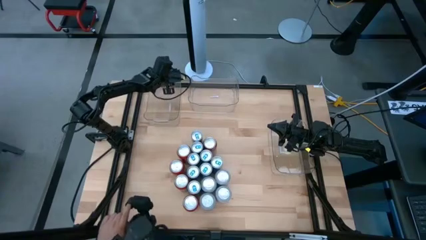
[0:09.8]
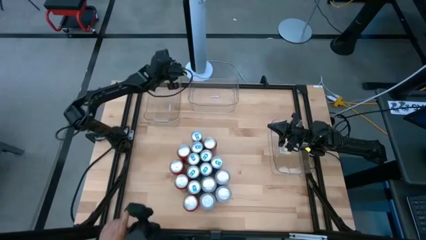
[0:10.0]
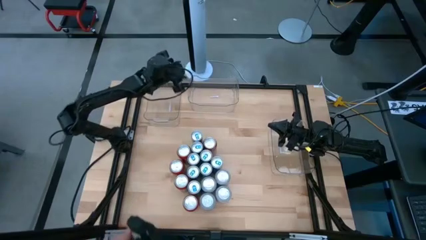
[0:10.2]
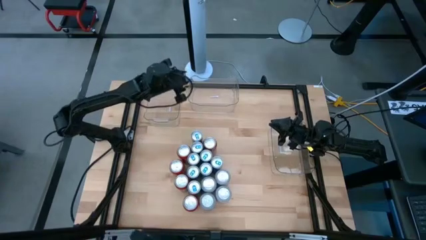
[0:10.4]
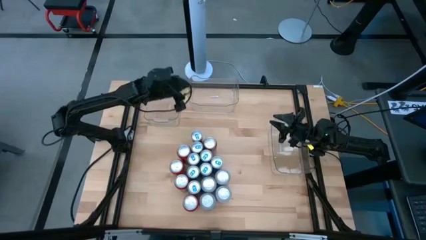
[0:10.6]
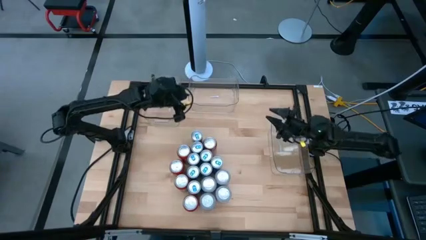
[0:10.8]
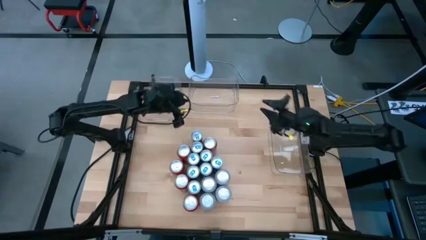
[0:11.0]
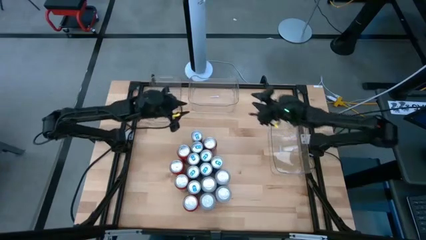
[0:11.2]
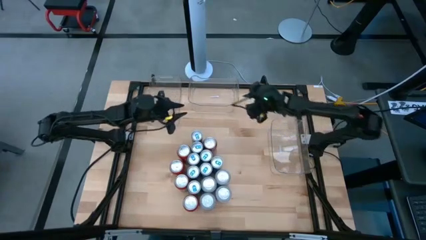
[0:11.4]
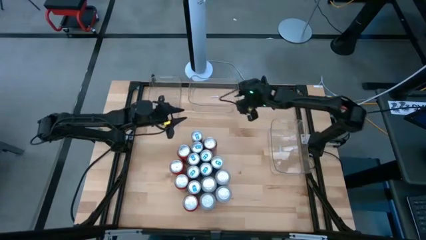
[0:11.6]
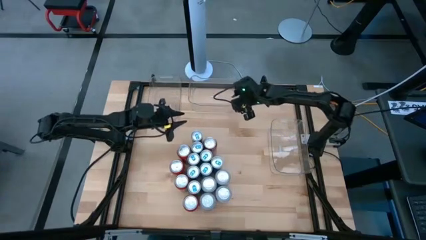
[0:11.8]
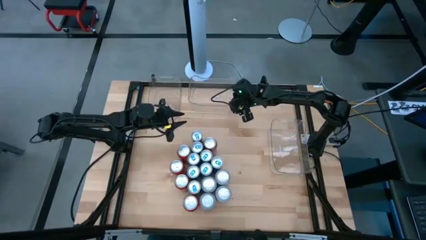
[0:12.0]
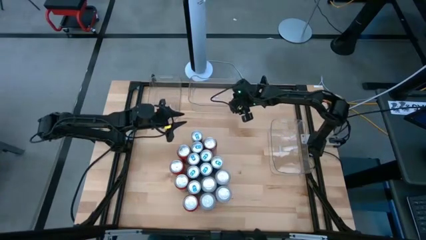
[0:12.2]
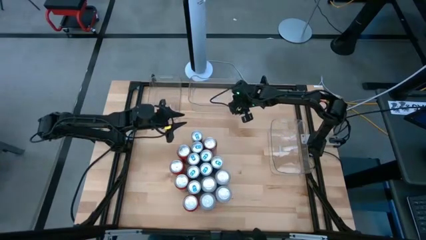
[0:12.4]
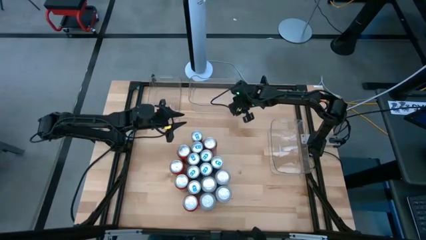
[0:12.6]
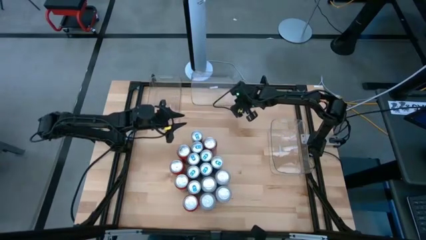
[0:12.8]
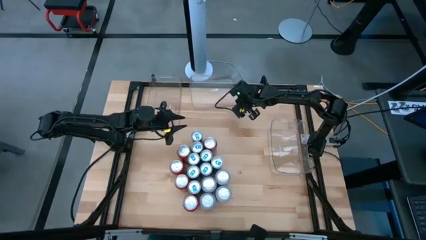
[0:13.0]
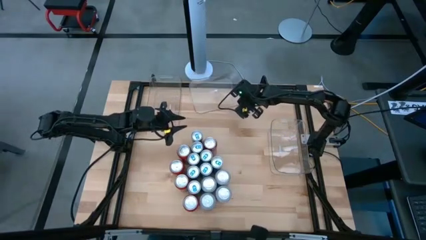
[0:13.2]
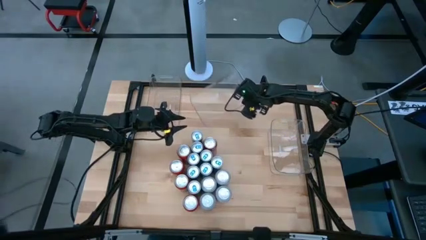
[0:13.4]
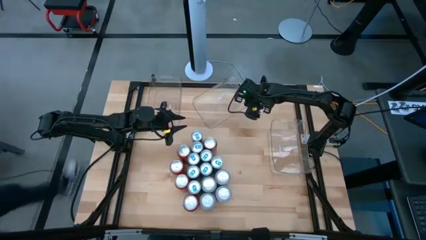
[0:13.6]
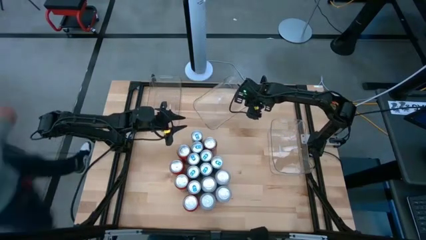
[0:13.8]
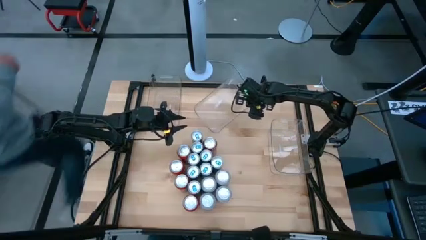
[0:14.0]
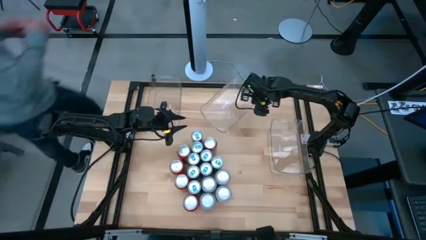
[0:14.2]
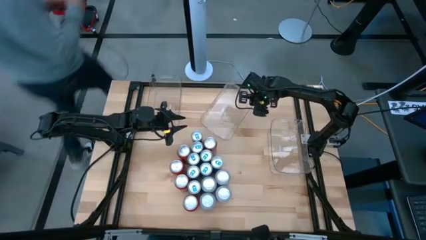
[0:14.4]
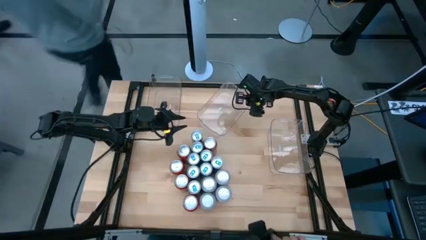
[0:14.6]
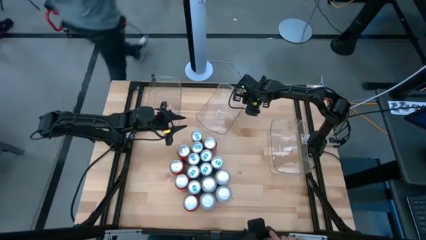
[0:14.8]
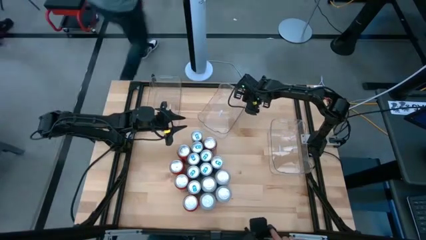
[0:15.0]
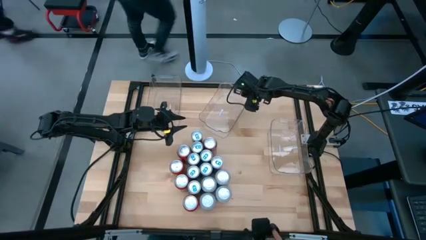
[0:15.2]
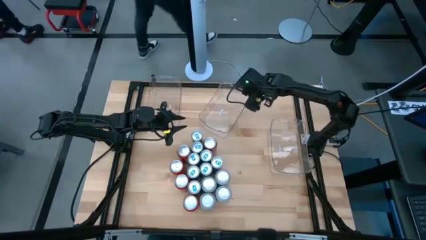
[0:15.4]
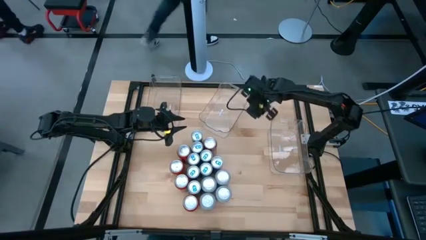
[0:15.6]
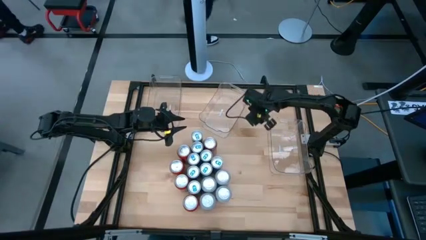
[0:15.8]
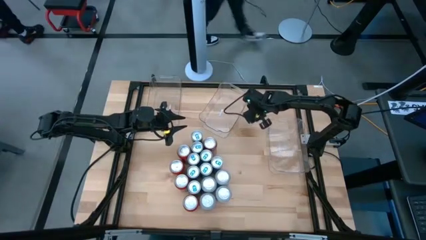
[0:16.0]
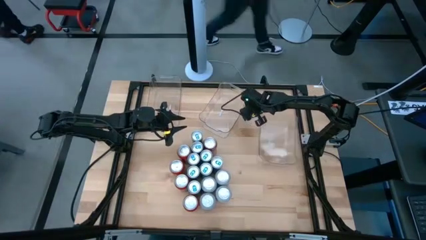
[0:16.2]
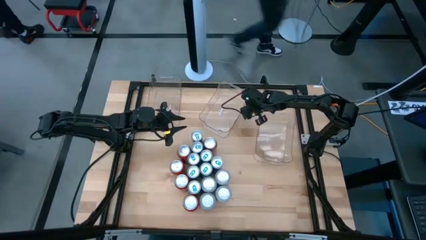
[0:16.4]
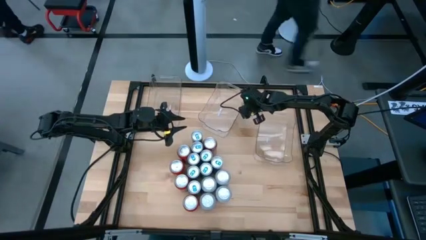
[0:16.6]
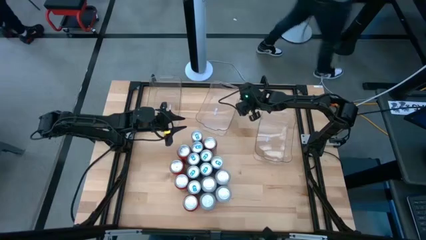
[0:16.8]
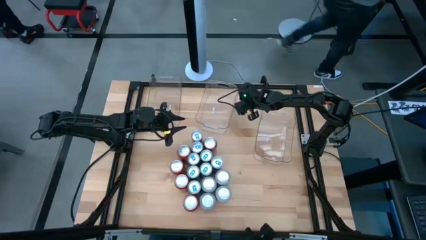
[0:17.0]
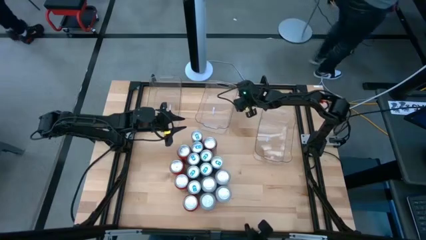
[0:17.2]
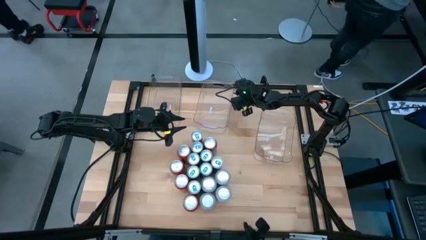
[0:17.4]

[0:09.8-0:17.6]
Task: Sort soda cans
Adjust the top right transparent bin

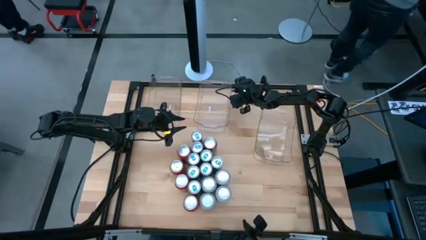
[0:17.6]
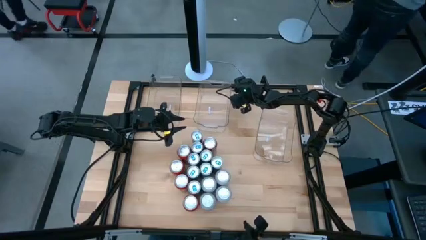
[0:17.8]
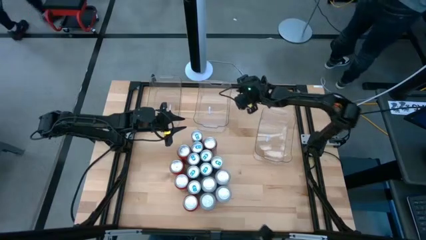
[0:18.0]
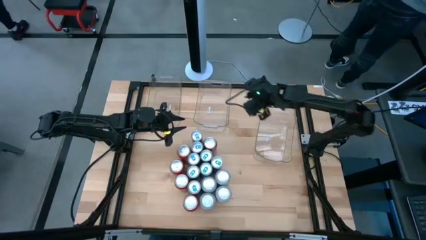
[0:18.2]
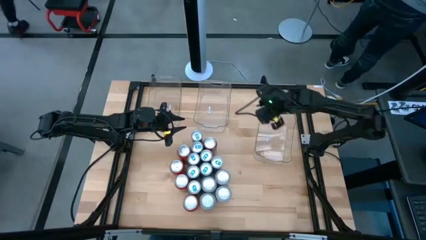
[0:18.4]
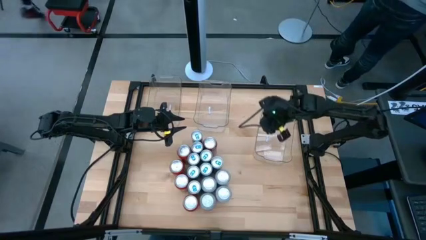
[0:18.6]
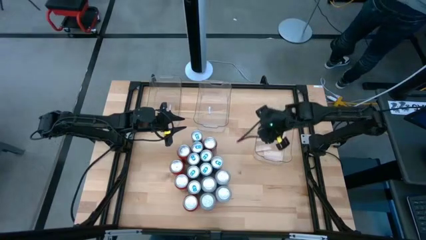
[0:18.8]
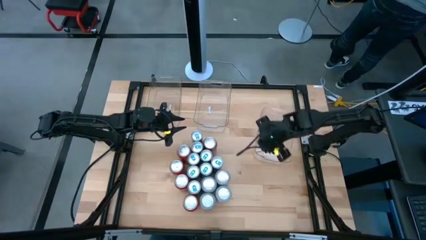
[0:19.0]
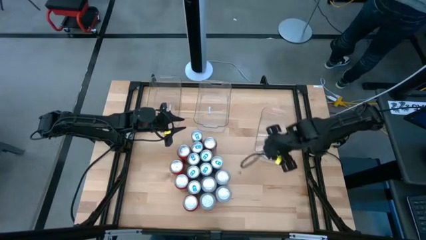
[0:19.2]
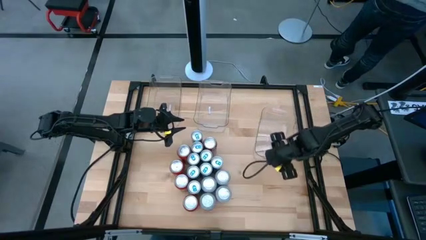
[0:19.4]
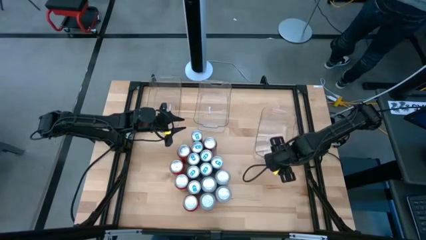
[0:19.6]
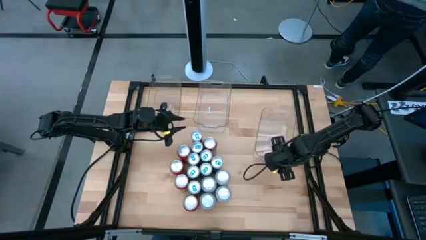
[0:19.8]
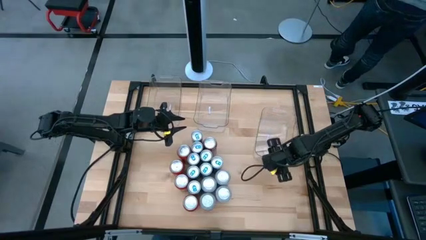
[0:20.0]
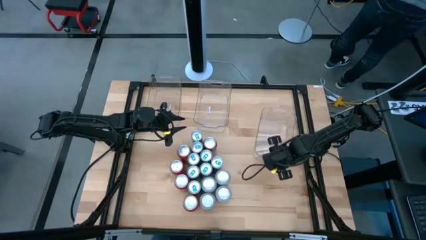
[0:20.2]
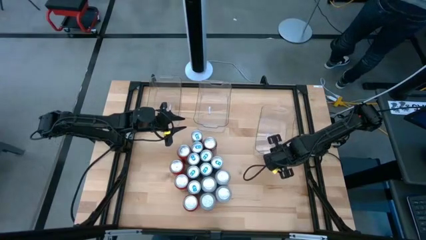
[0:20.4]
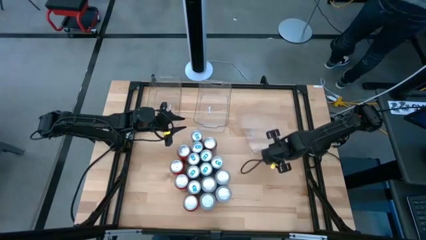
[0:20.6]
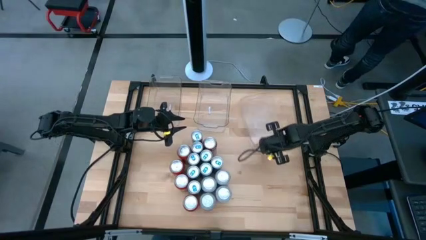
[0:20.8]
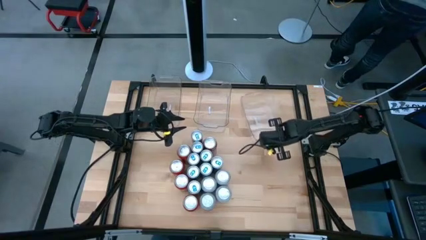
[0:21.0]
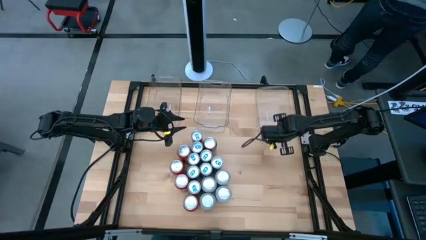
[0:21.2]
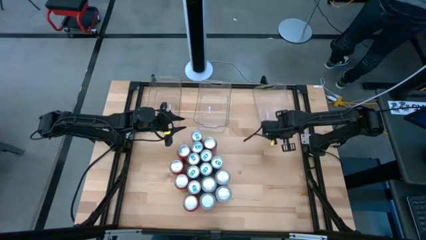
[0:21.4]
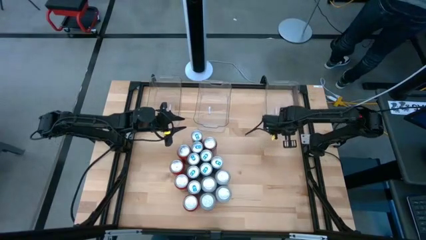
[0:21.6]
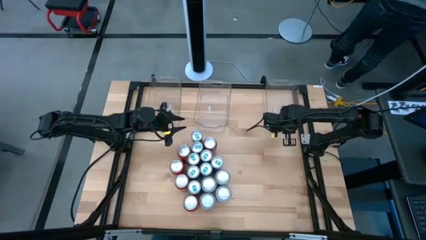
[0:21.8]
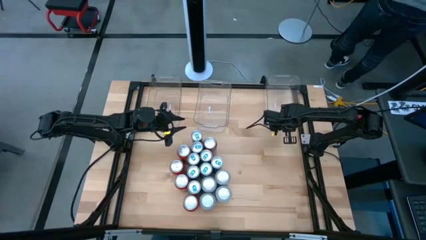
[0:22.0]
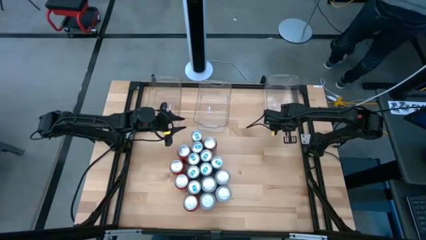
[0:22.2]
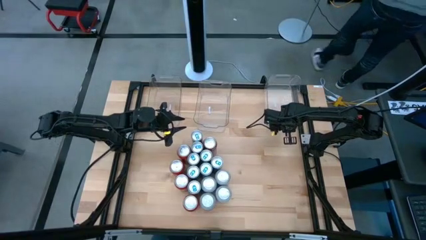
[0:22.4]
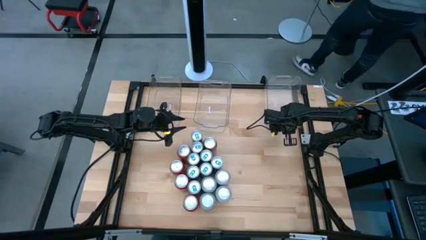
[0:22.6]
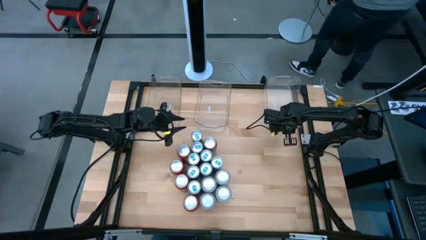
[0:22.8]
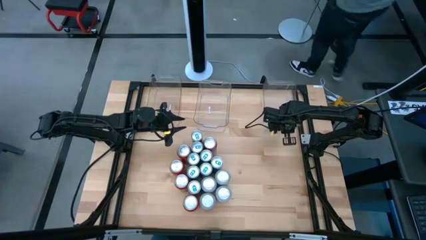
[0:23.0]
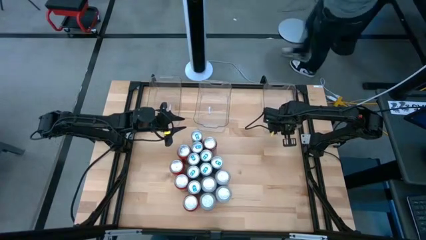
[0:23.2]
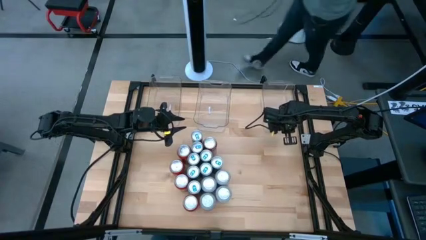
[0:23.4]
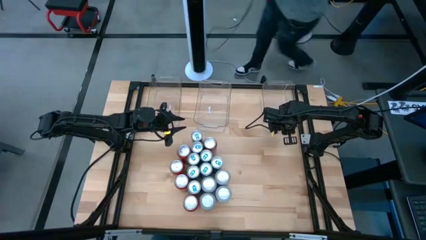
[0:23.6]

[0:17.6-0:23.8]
Move the bottom transparent bin to the top right area of the table

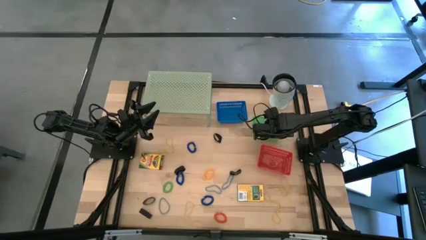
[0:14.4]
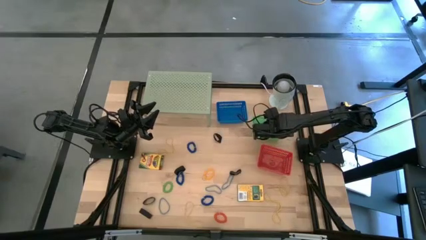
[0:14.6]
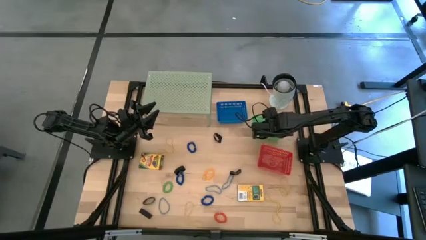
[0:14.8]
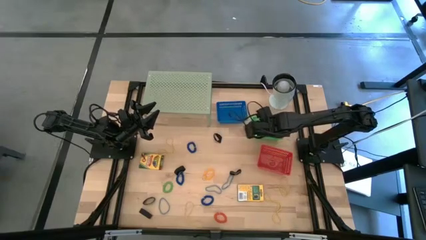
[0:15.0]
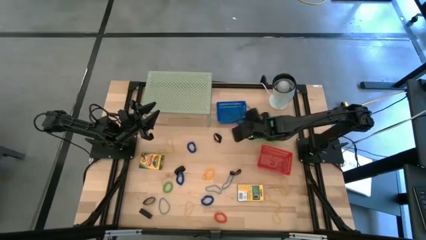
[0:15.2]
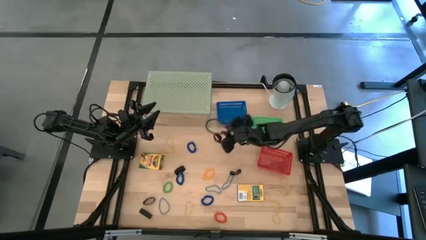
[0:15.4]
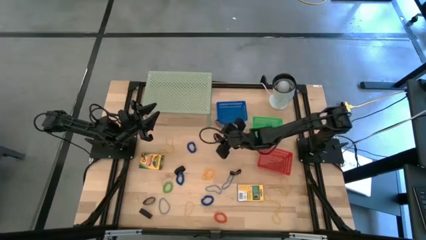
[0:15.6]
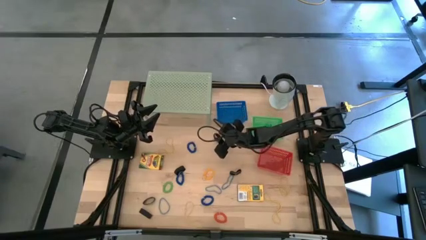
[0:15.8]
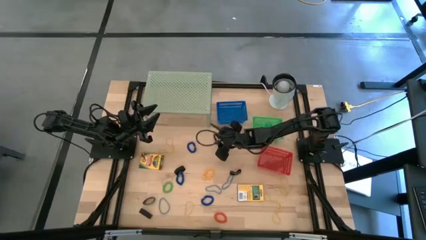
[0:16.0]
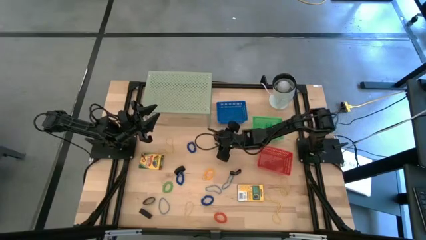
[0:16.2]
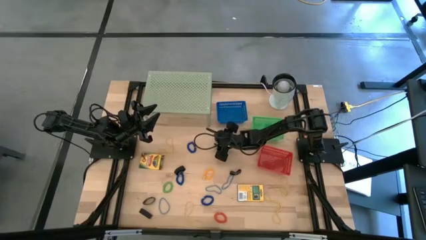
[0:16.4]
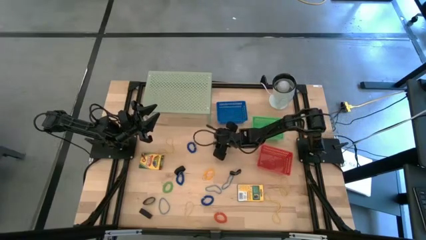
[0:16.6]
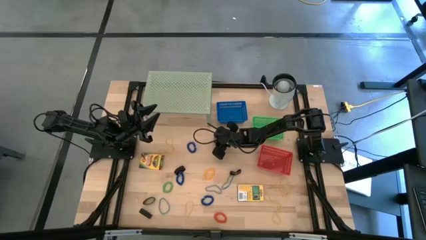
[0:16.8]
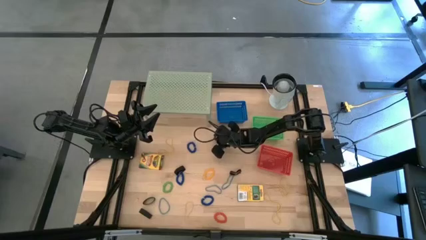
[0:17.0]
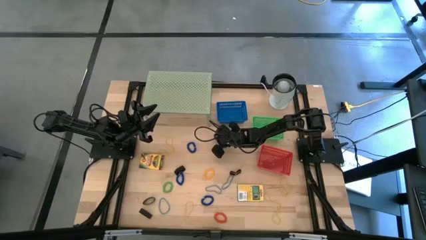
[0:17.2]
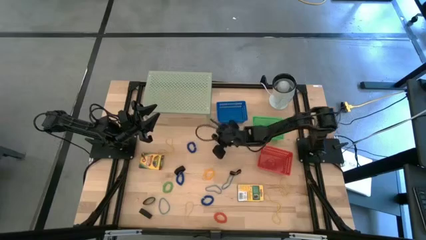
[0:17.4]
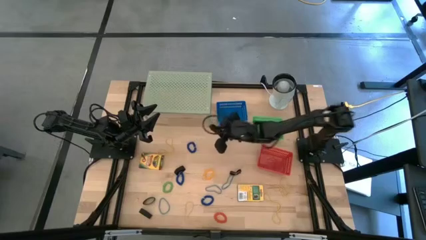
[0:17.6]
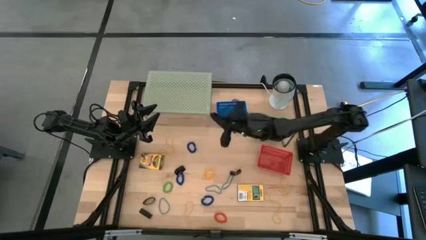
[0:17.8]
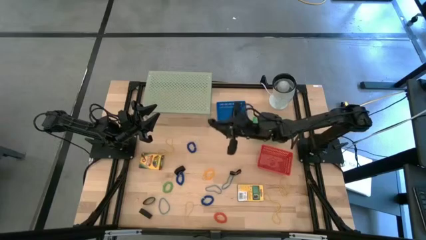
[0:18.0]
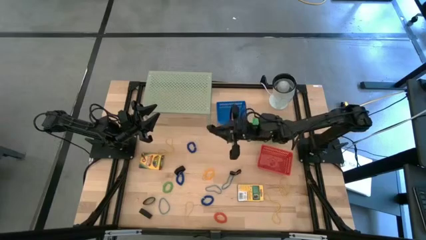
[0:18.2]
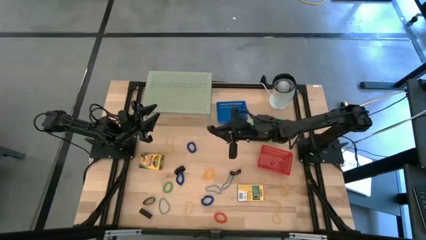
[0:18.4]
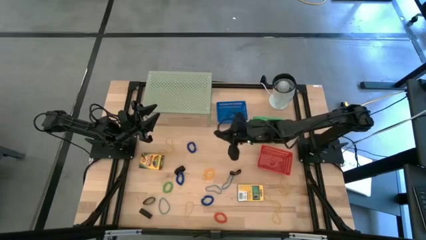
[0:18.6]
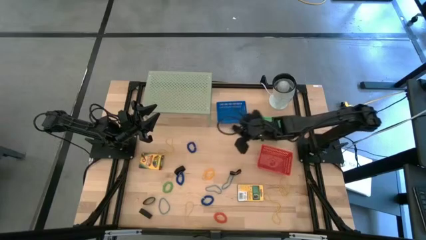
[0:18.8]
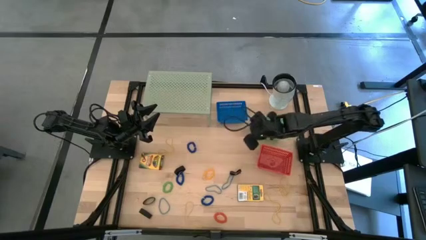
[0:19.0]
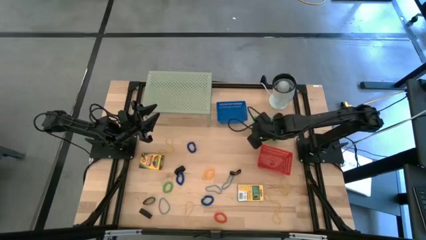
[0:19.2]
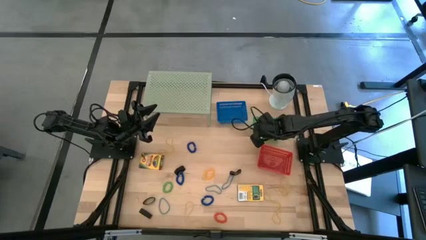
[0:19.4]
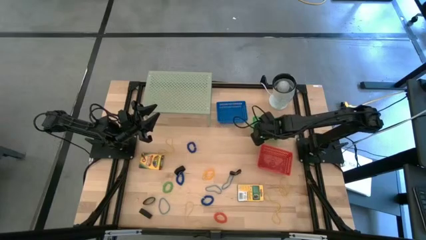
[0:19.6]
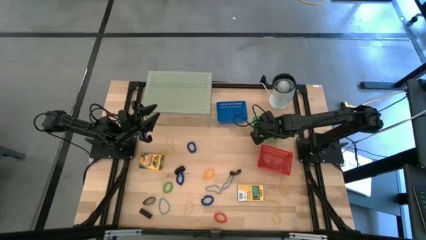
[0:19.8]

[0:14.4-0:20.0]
Task: Pick & Place Office Desk Supplies
Put the black rubber band into the green bin
